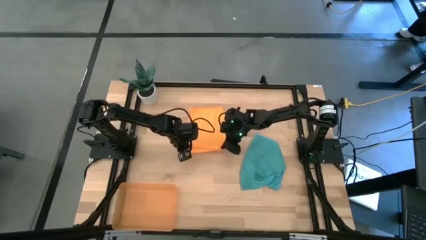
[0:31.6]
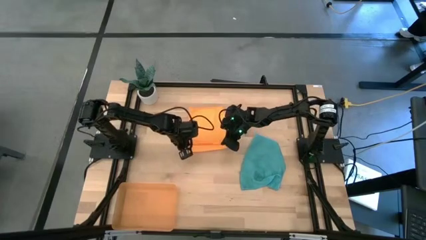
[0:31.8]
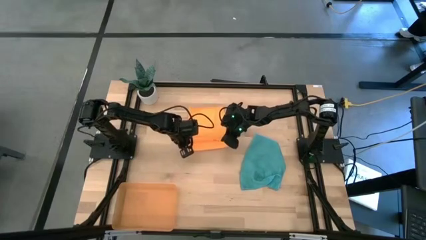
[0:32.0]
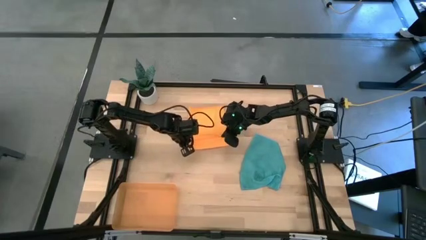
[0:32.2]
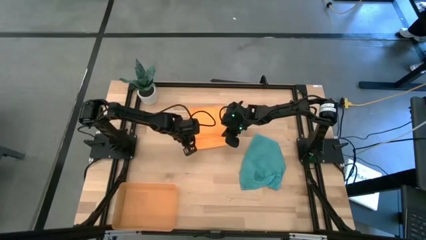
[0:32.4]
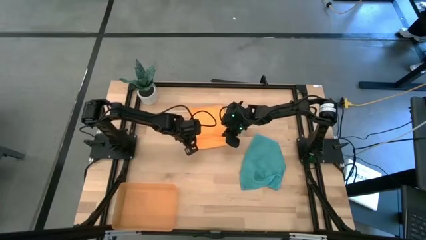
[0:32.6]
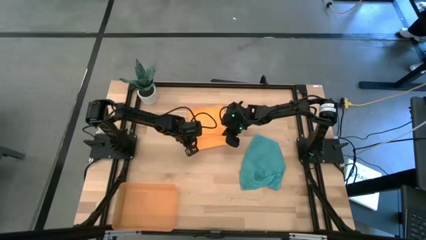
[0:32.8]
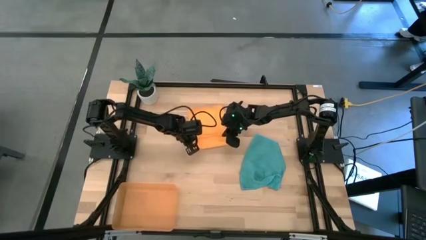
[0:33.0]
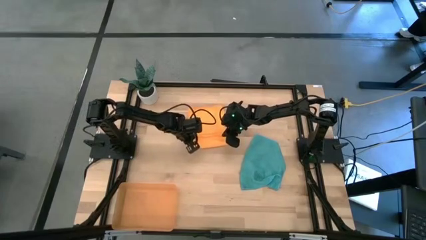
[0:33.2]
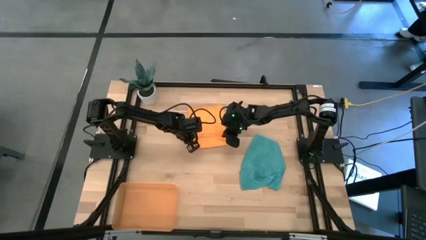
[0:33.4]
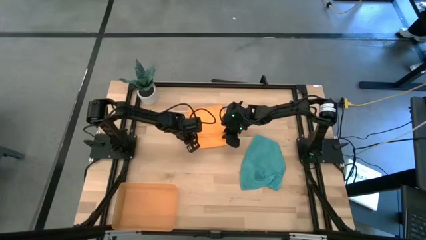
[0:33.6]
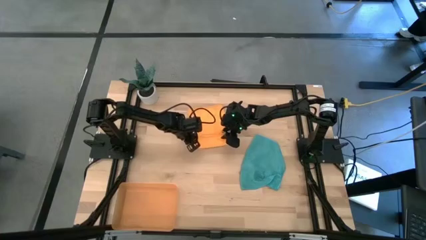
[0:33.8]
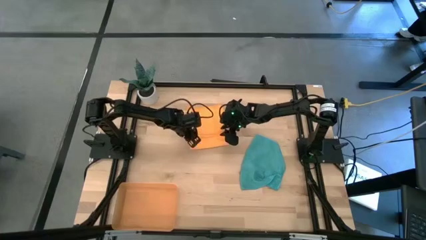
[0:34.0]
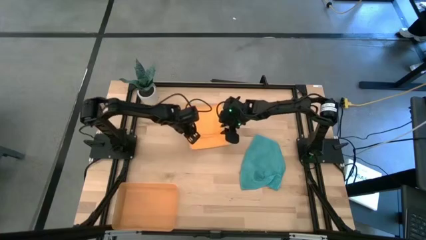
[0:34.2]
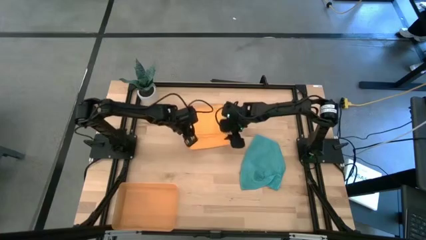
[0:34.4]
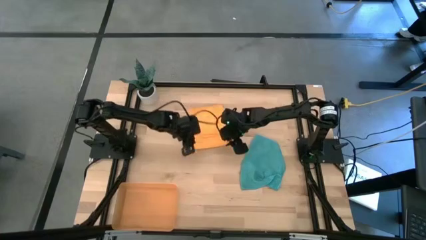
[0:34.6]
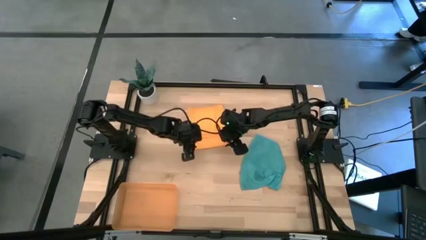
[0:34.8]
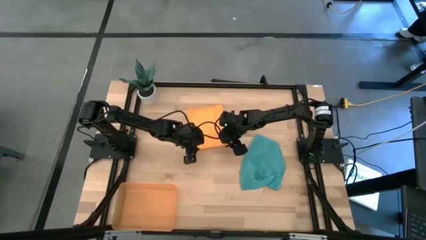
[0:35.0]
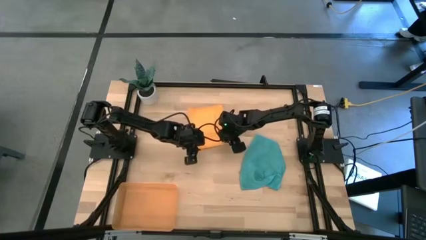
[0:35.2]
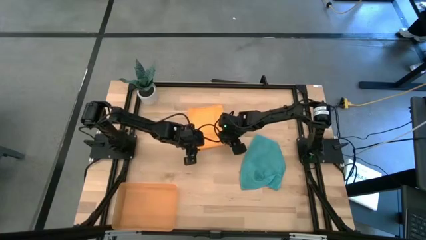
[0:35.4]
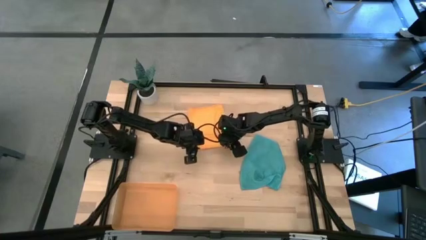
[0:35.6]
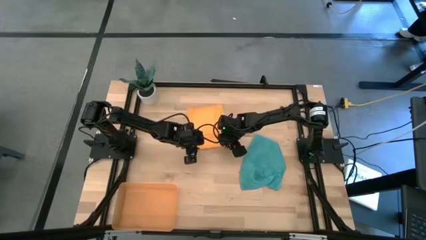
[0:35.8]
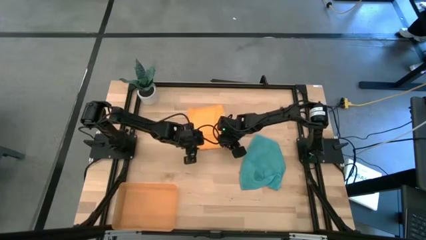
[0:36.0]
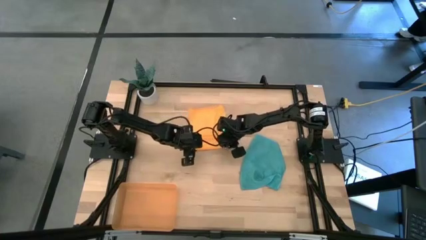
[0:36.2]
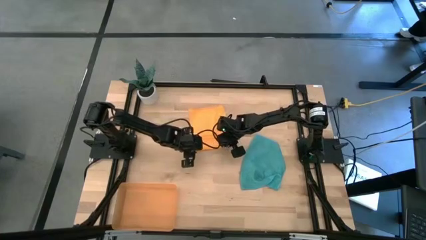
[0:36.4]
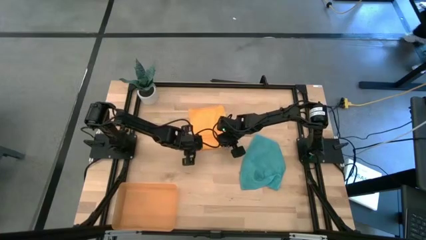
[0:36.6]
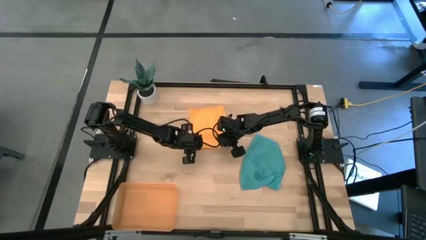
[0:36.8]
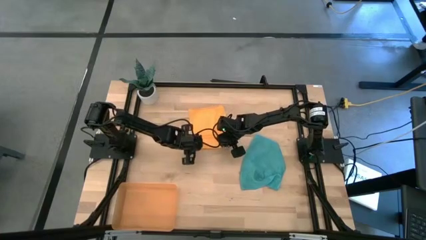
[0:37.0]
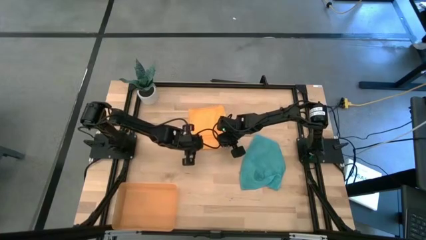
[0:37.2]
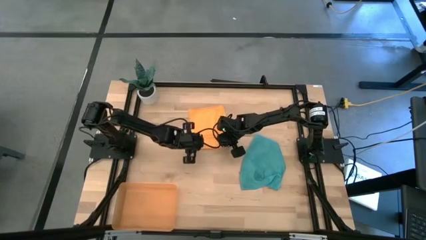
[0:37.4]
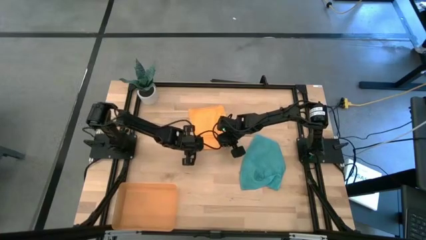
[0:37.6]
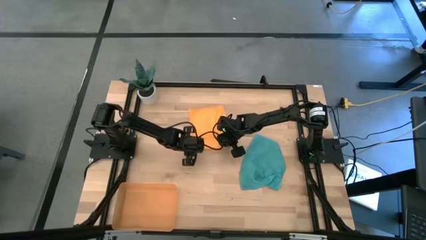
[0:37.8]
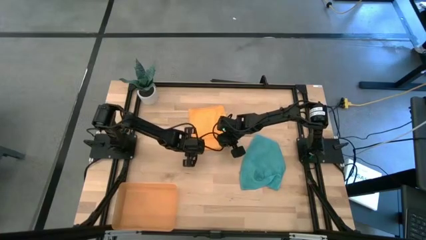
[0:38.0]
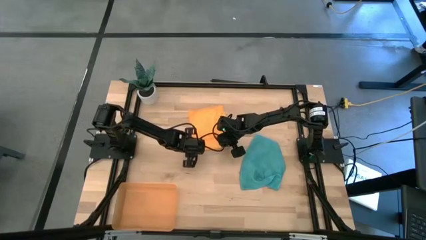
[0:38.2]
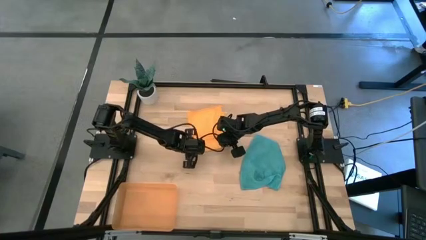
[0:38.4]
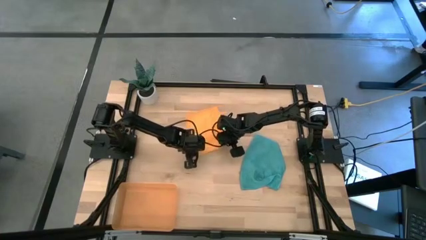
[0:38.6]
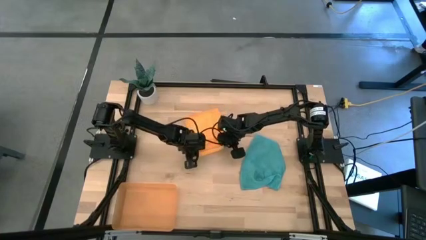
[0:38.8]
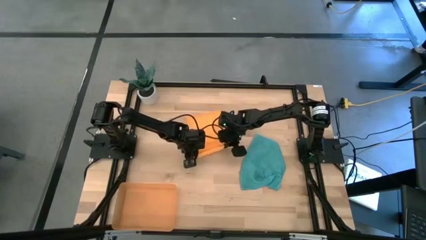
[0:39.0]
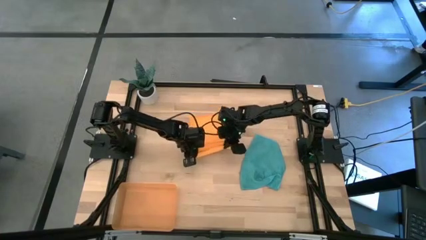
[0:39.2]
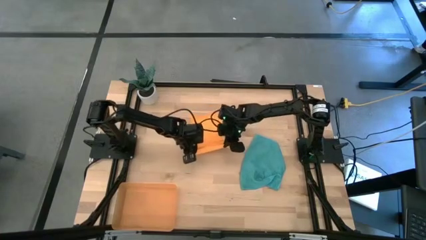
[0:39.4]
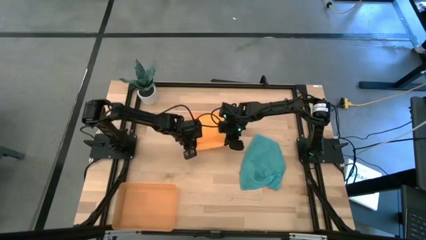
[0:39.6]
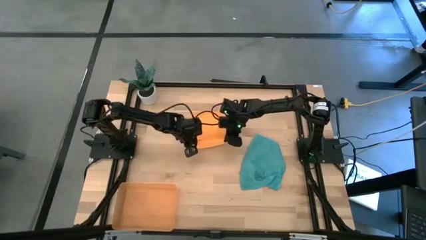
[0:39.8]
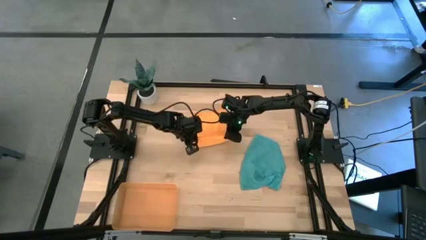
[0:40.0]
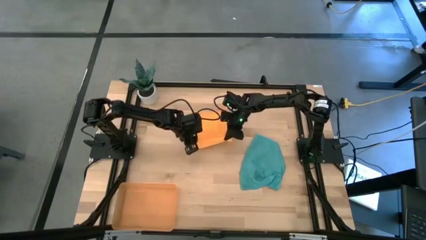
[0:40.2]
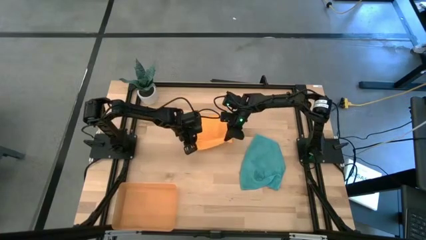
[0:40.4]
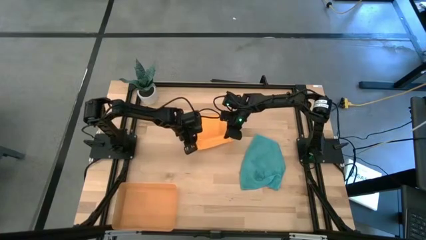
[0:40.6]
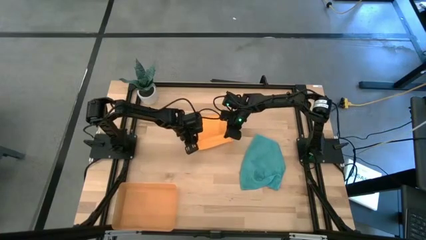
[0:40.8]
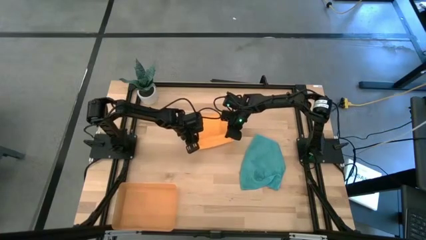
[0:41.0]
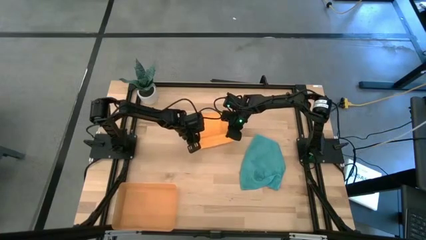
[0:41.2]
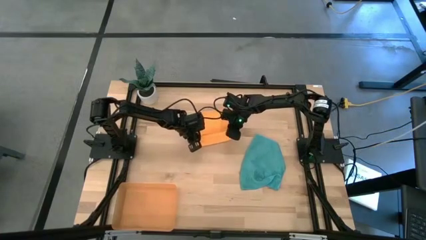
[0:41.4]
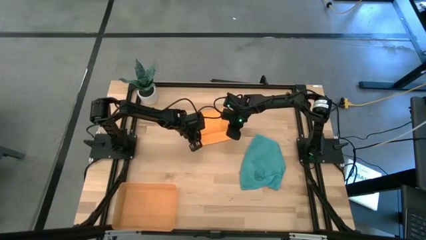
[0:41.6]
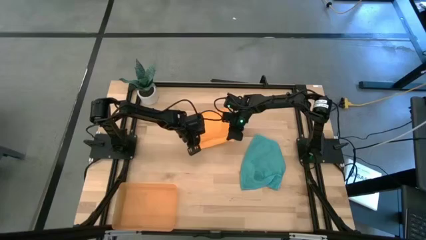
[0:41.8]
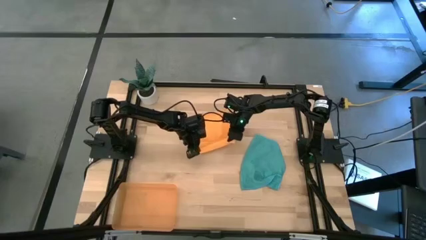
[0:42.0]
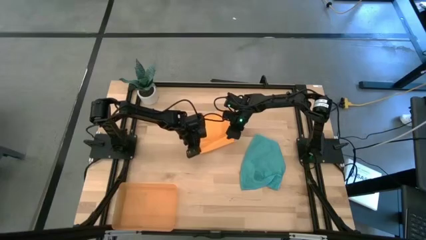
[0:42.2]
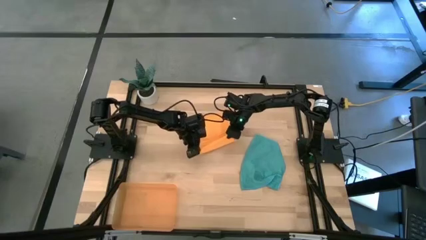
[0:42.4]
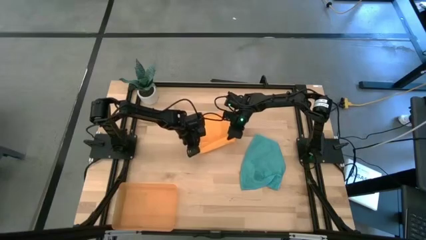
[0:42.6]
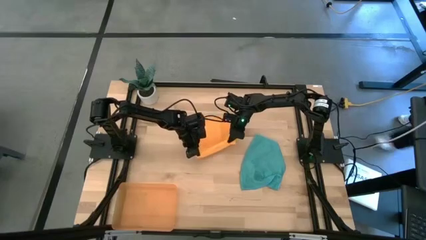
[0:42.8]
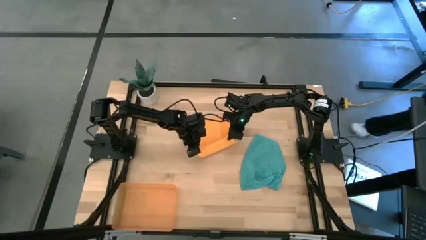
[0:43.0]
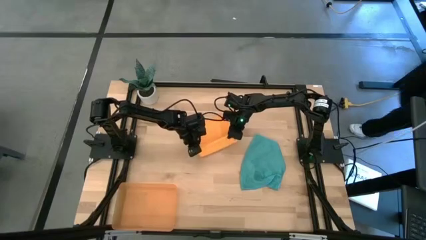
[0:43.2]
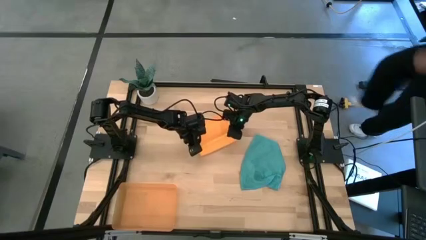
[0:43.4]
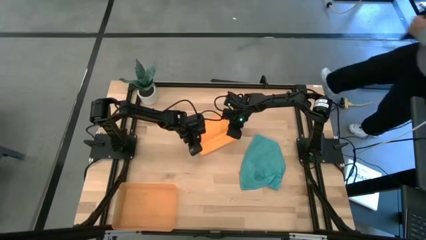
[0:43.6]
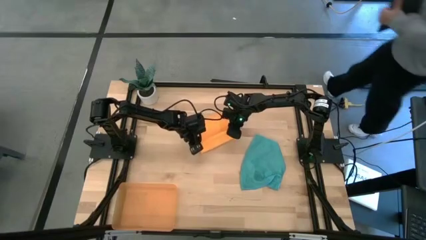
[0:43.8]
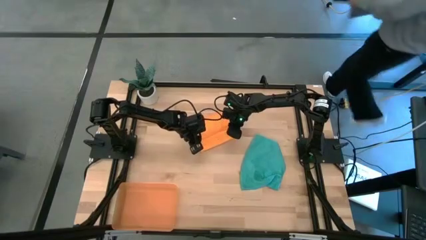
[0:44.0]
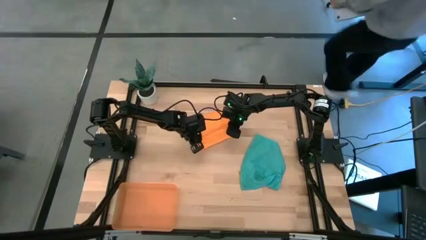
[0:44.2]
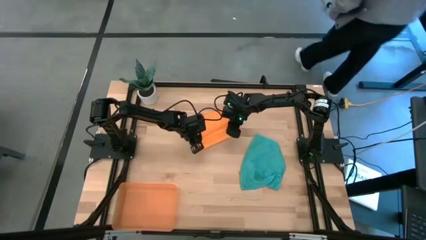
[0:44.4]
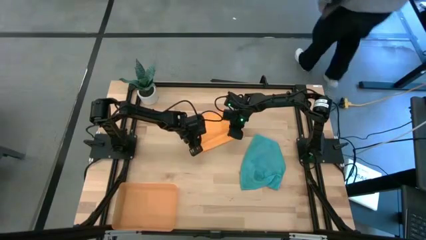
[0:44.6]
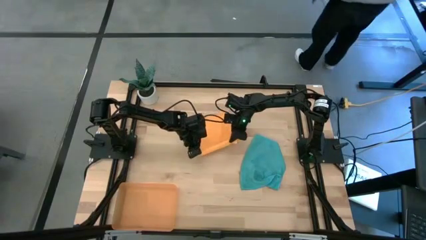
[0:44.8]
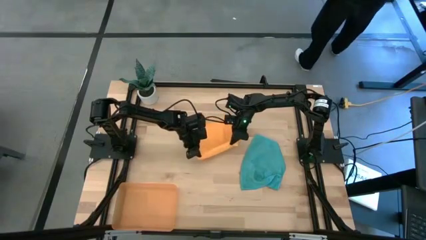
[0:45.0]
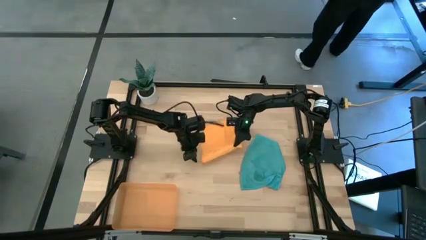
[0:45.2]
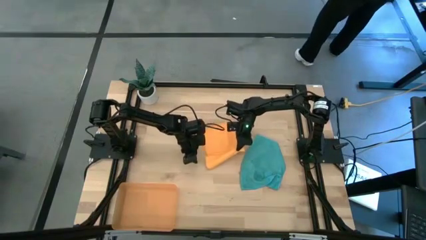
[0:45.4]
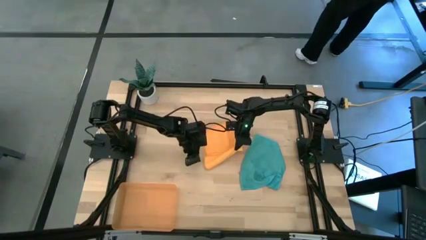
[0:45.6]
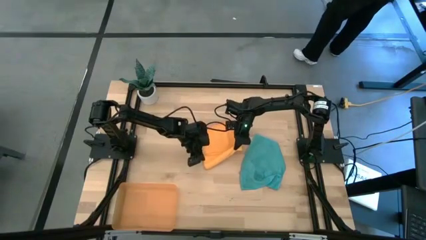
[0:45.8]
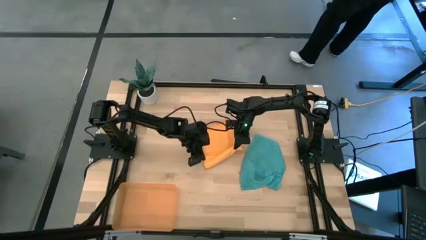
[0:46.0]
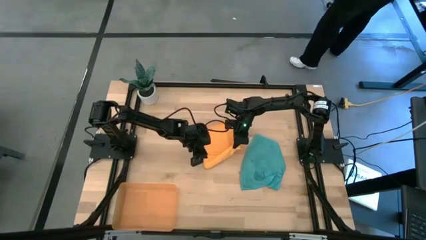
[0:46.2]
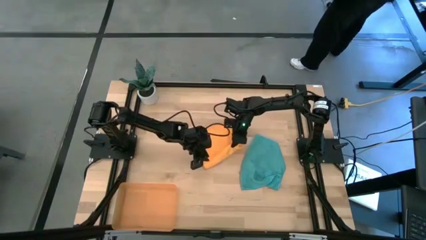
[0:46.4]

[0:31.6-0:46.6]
Task: Roll microfiber towels into tight, uniform cylinder then place into a basket
Roll the orange microfiber towel
